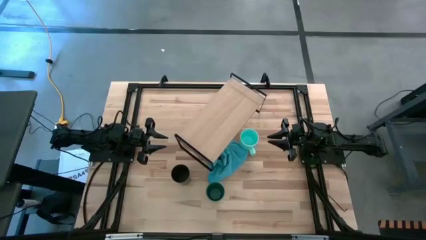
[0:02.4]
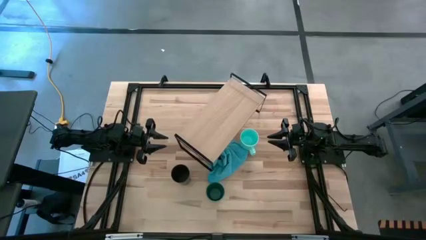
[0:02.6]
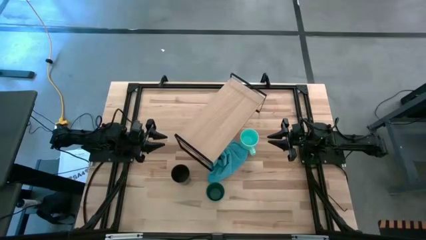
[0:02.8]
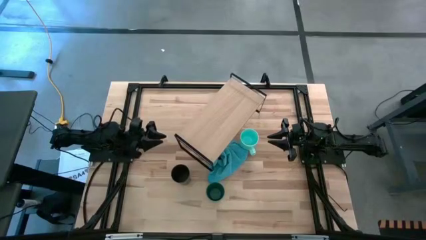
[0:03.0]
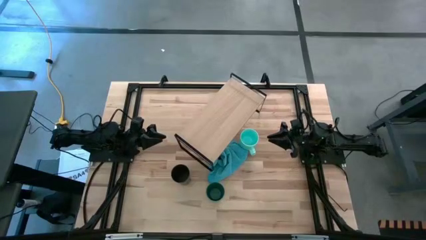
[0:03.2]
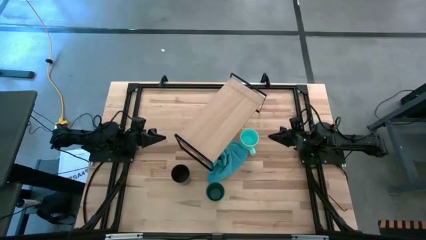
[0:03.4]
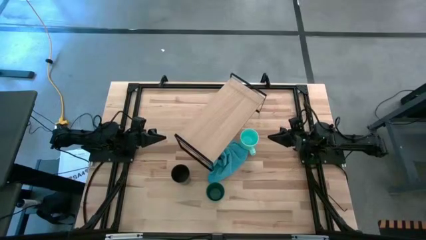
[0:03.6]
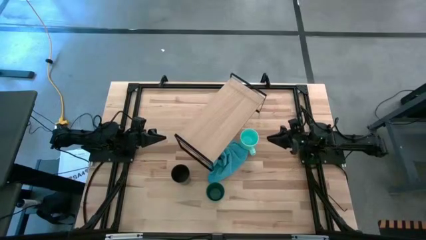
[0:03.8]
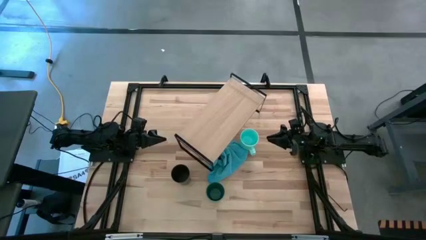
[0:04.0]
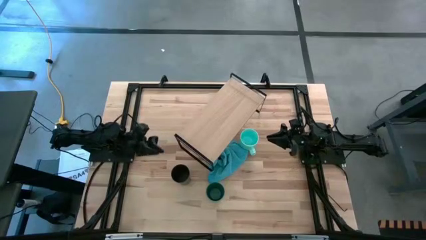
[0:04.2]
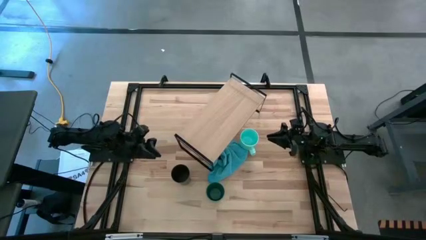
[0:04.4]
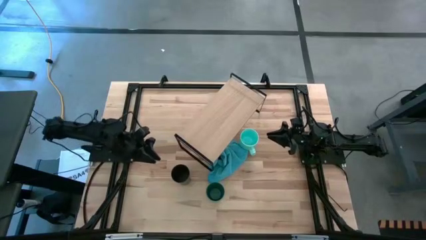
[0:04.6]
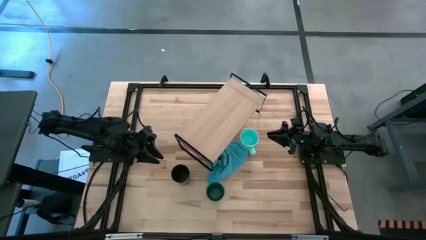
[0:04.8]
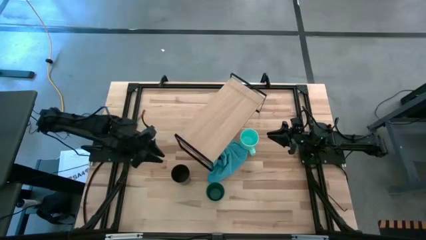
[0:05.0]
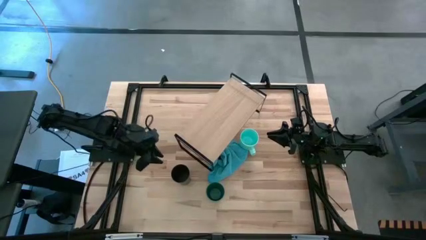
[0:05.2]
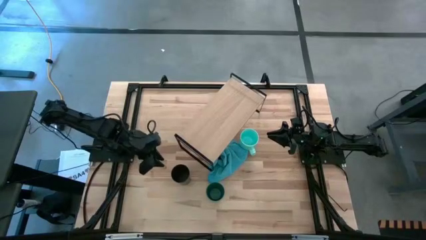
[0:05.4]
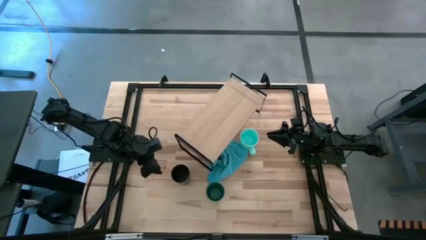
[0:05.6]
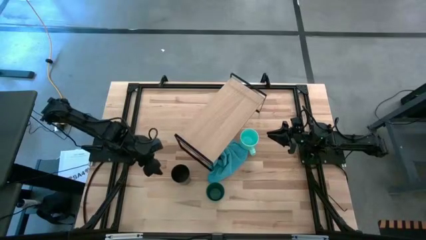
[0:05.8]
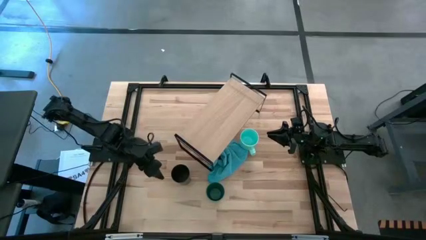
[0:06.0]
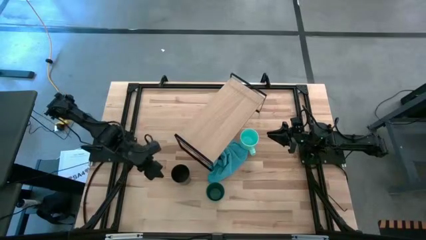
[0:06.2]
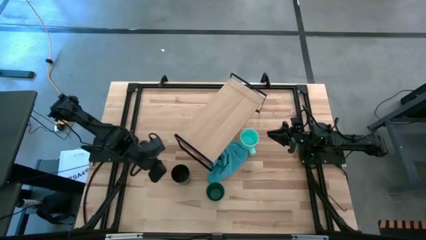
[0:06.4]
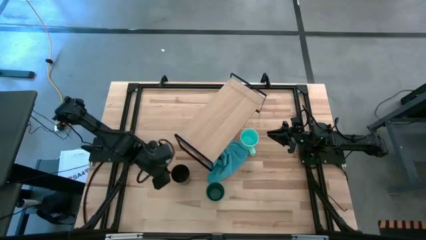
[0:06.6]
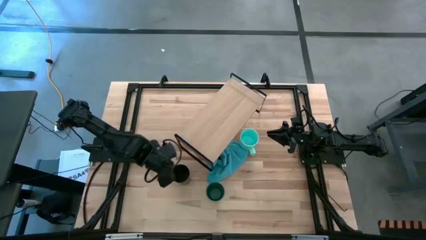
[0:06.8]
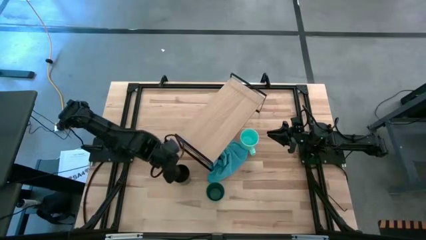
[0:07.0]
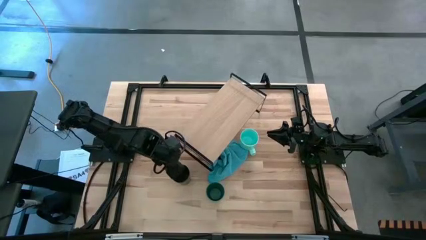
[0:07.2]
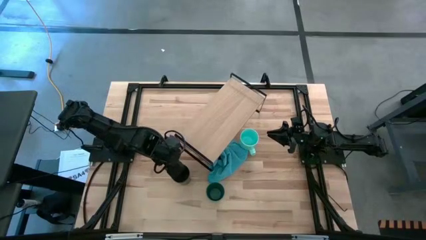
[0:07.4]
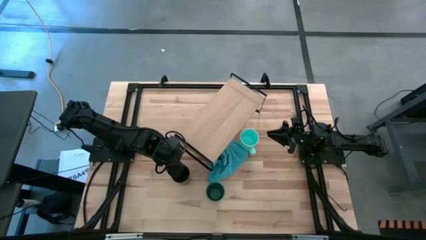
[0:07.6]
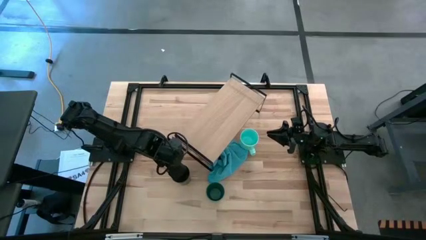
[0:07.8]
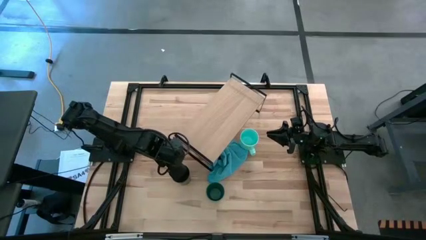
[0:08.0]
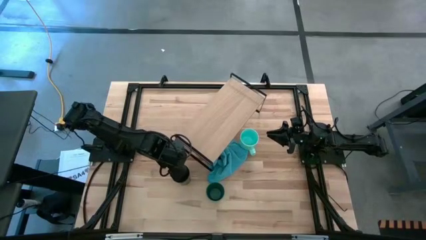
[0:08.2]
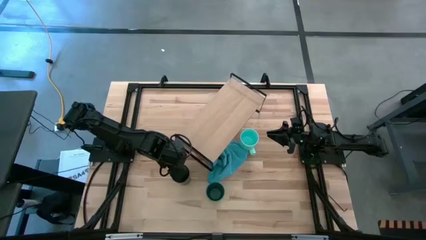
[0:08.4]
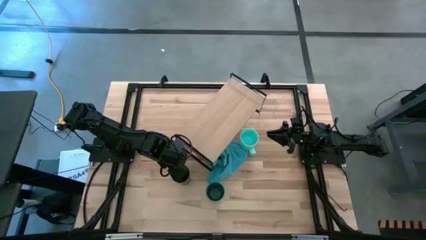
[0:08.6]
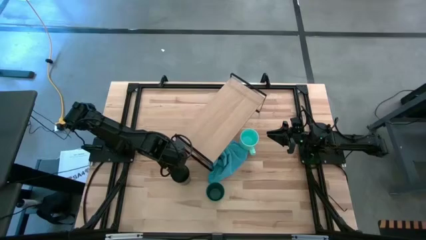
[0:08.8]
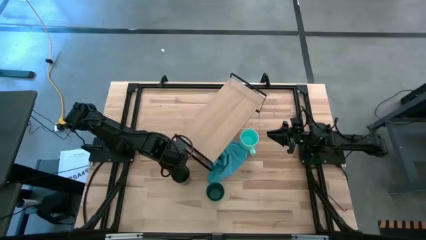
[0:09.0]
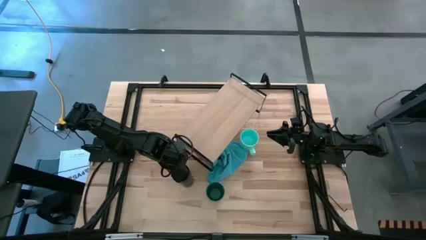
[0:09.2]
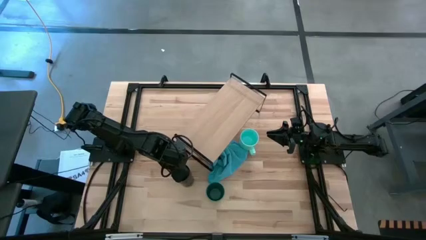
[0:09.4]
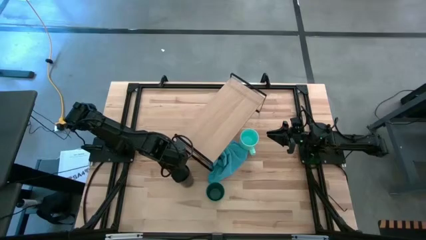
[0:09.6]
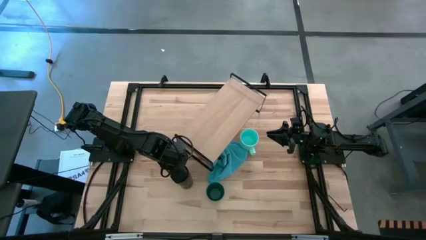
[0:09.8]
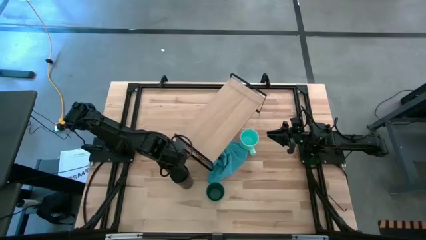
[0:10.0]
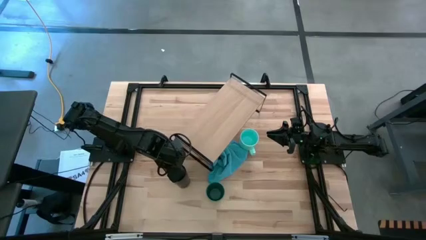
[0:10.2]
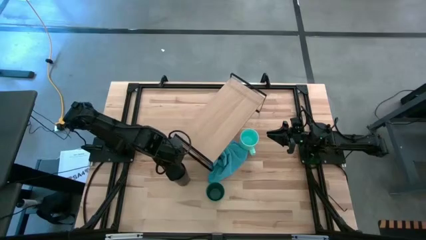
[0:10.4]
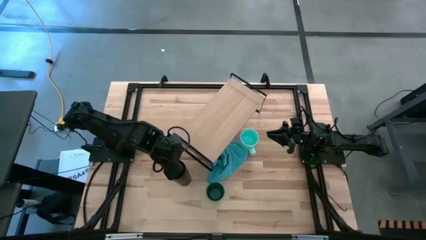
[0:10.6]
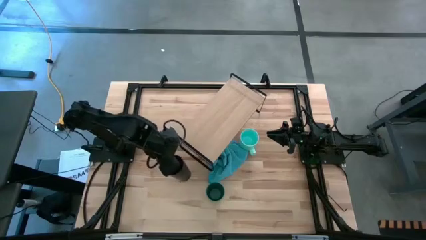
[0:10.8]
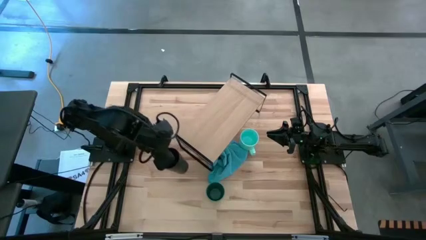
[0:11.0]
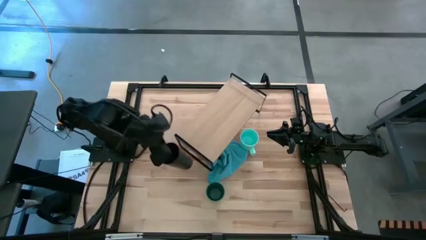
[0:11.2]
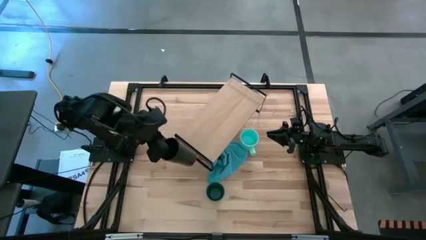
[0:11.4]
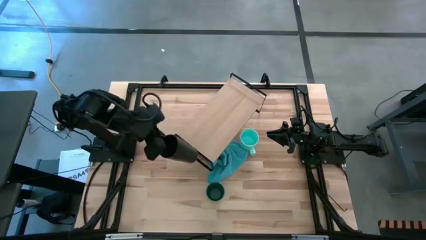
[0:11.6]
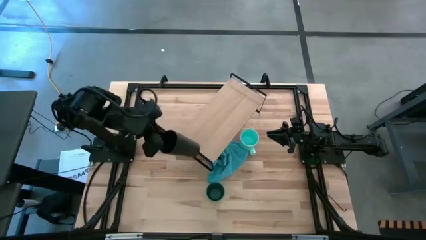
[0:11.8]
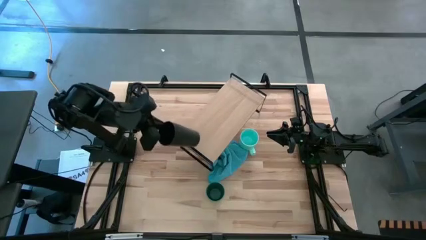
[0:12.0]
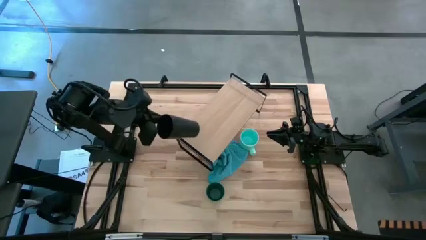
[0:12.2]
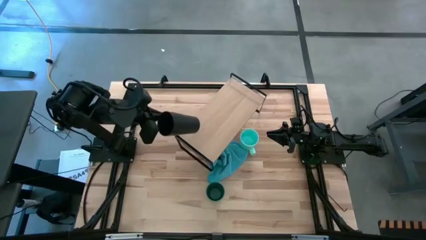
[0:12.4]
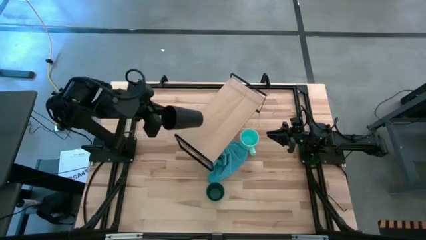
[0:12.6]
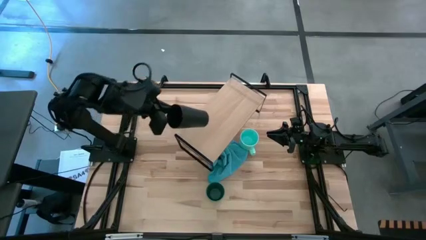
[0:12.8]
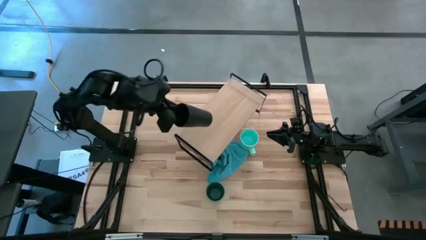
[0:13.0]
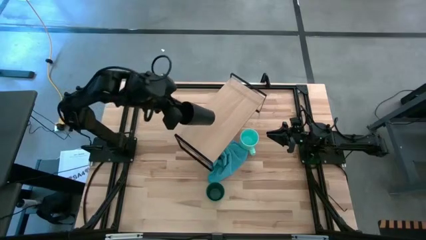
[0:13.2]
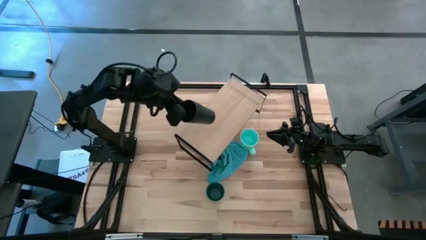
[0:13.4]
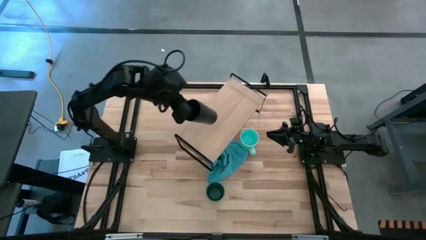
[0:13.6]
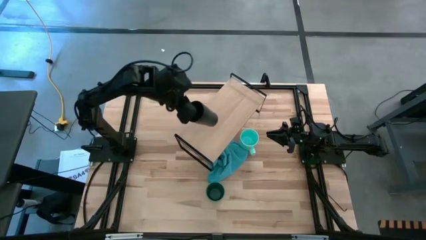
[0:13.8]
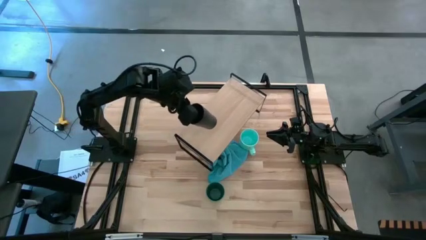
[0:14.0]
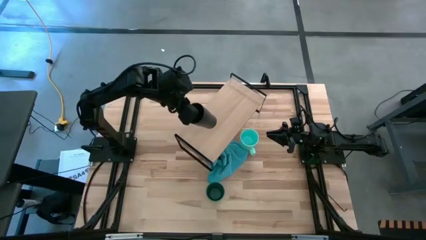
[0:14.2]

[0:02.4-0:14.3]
Task: Stack small to large cups/mugs on shelf
Put the black cup on the shelf

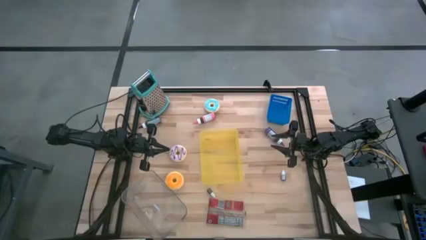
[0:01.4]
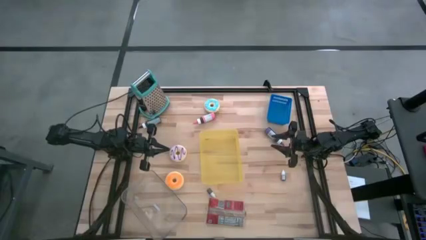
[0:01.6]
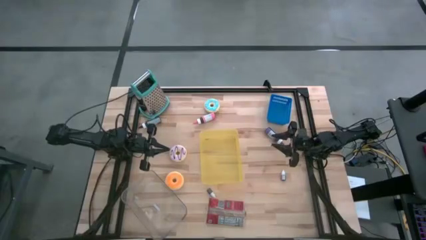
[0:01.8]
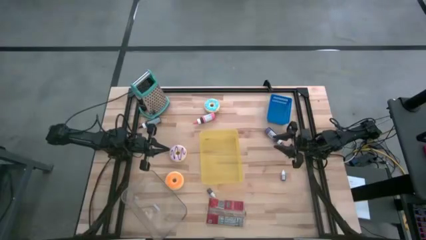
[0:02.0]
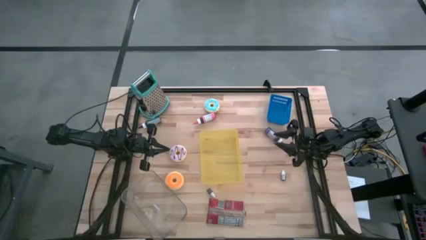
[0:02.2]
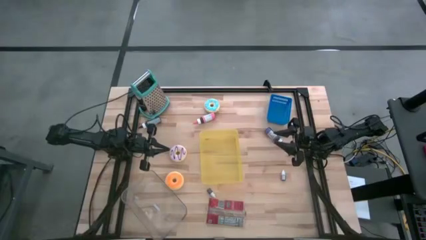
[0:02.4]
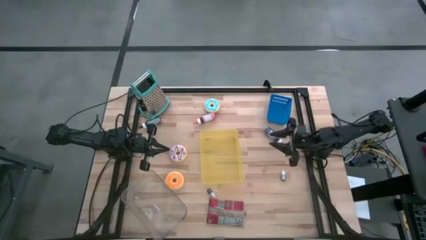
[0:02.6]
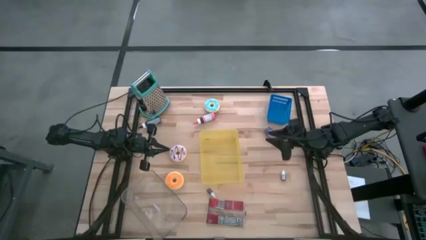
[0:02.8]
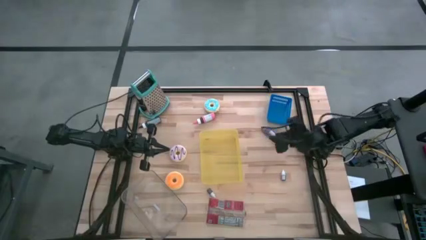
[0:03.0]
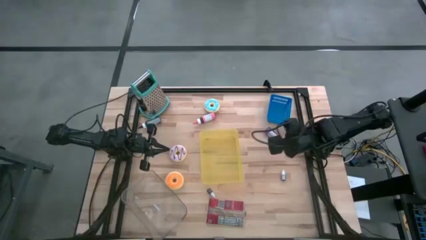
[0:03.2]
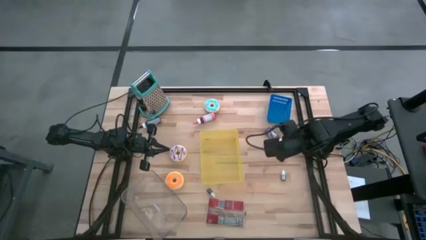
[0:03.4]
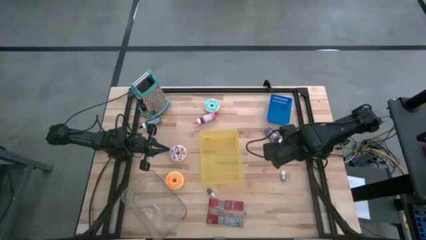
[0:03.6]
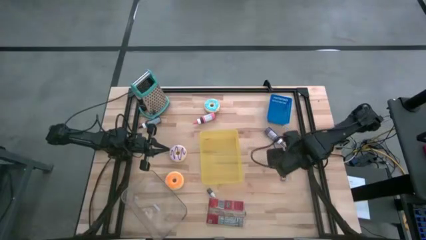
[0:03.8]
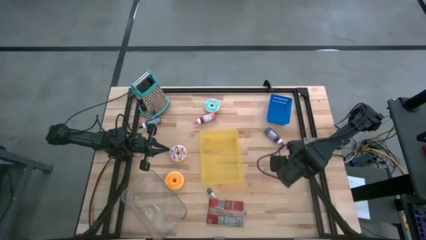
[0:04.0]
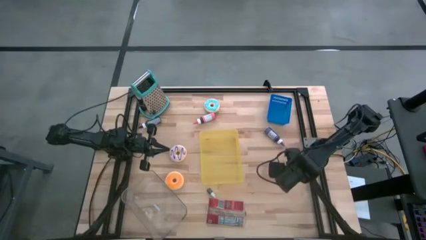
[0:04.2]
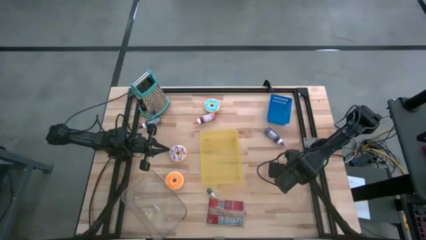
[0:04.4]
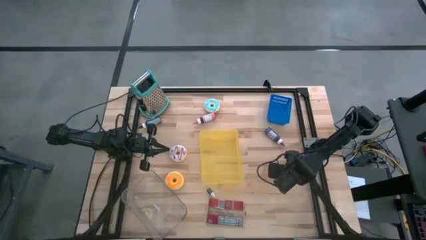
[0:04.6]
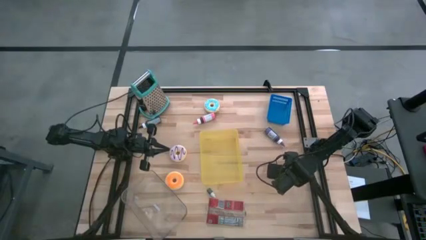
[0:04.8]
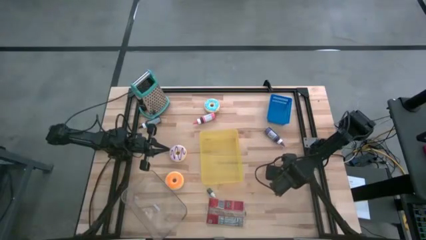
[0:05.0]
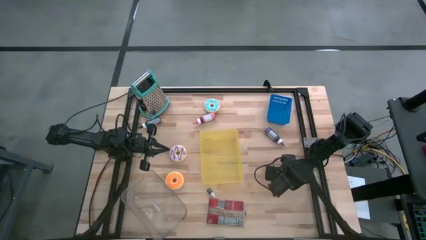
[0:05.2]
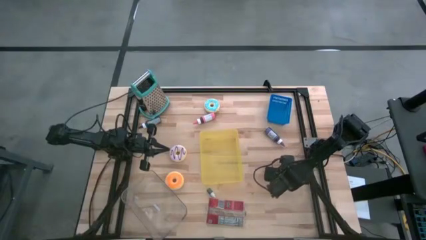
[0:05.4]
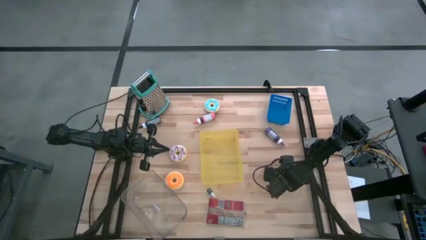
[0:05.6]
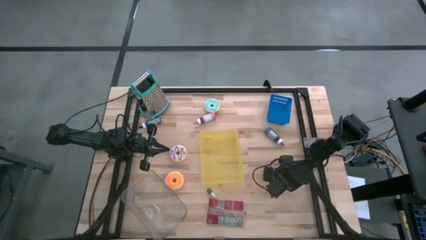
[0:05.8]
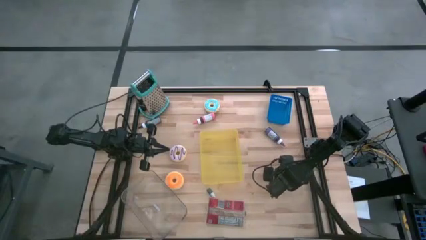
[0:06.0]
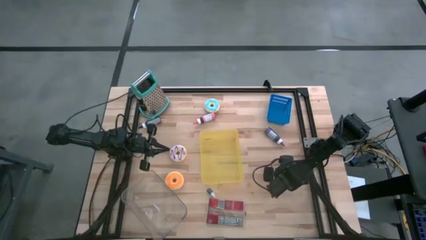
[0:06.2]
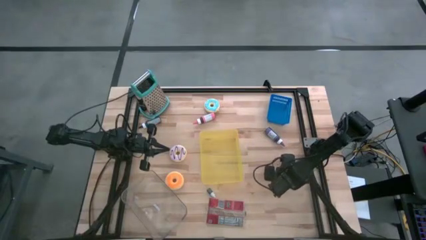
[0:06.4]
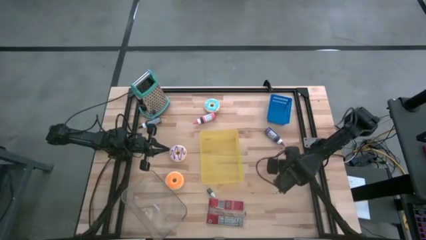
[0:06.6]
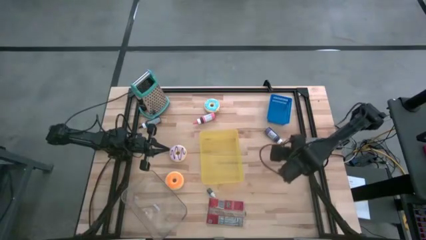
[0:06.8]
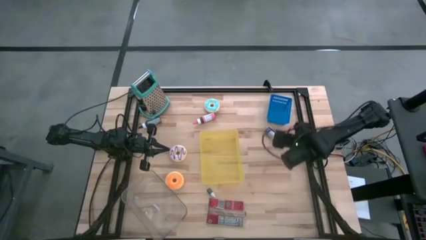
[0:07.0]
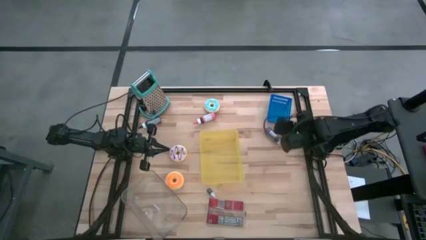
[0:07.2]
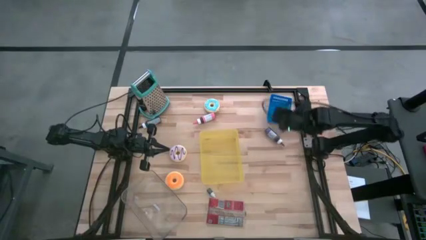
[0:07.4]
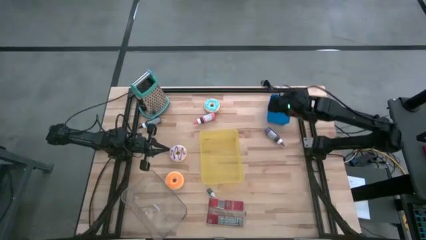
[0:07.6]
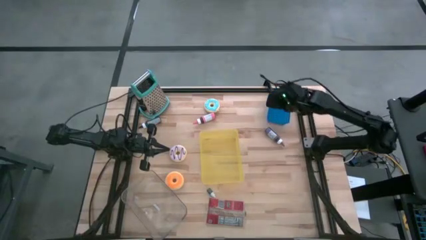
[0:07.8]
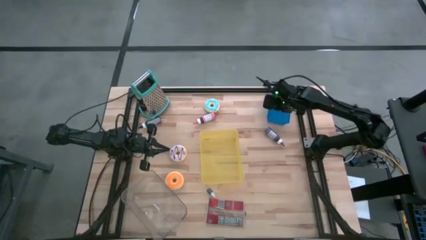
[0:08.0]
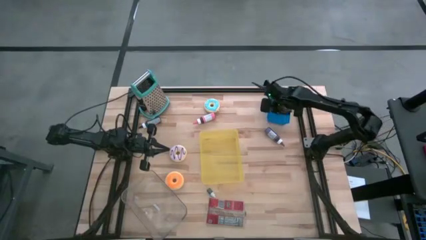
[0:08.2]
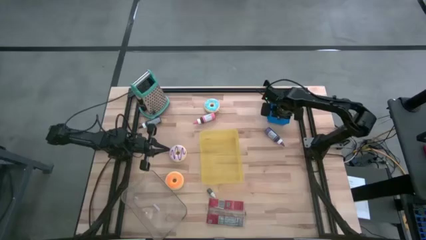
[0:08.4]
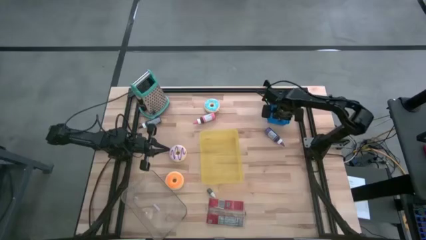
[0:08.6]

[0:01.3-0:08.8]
Task: Pick & Place Food Item
Put the small red food coloring bottle into the blue bin
